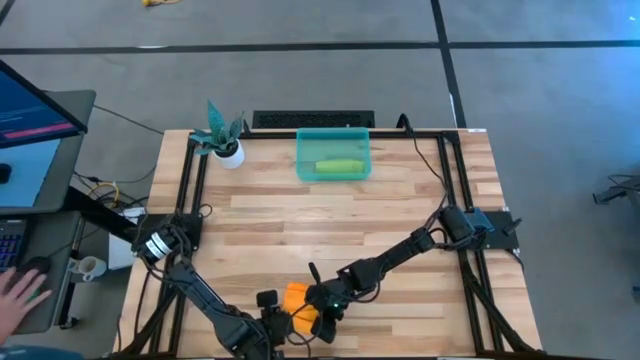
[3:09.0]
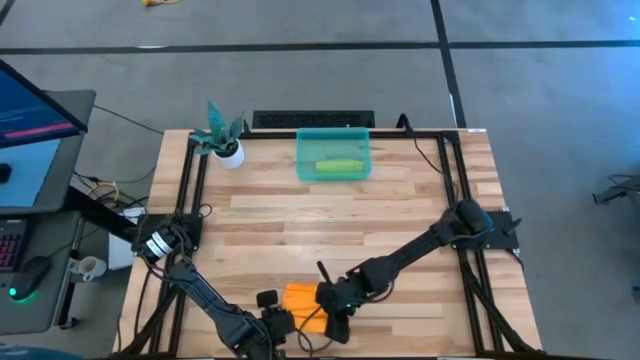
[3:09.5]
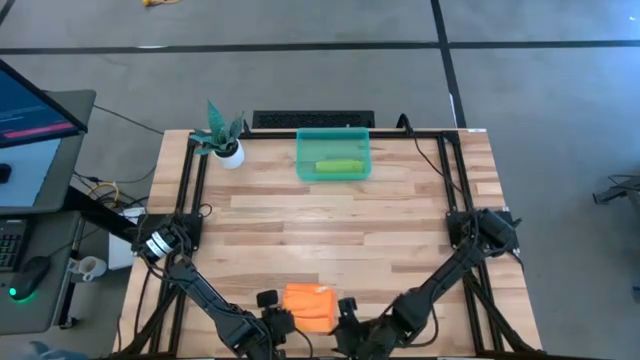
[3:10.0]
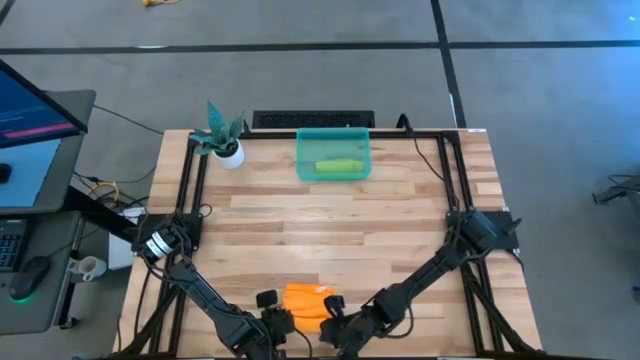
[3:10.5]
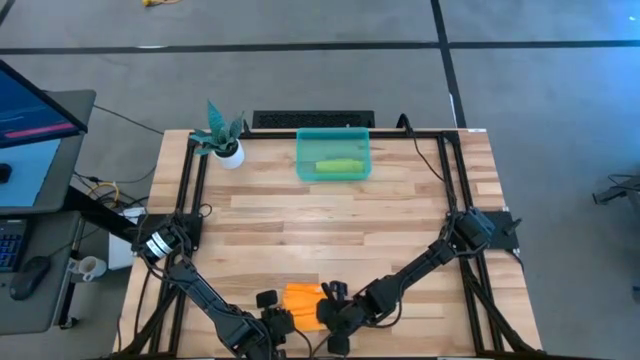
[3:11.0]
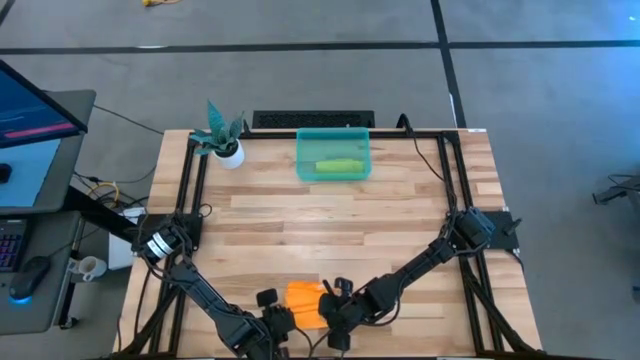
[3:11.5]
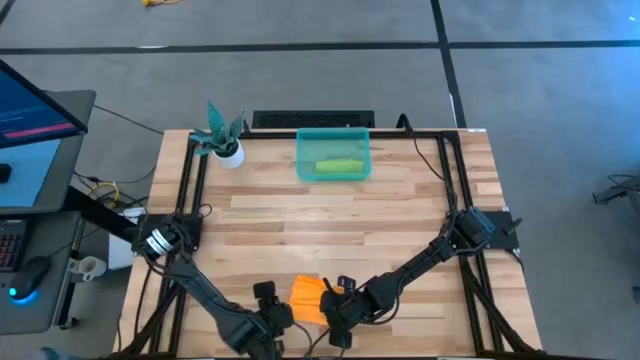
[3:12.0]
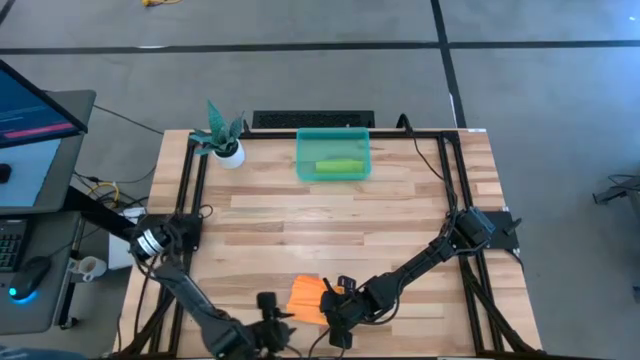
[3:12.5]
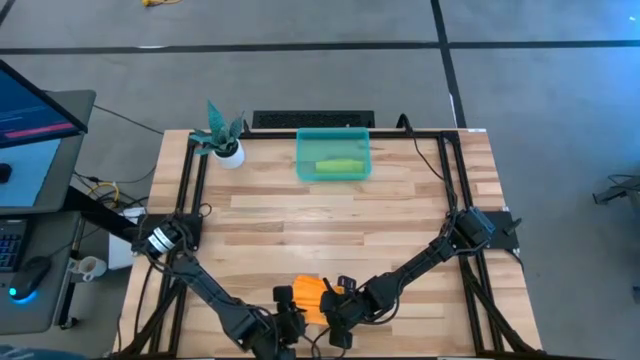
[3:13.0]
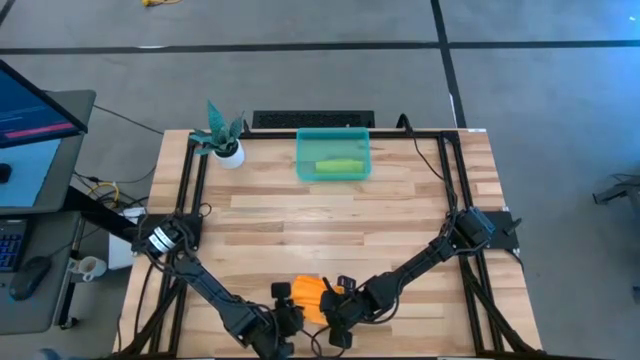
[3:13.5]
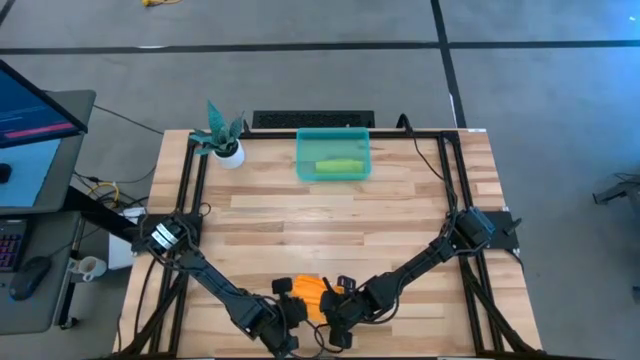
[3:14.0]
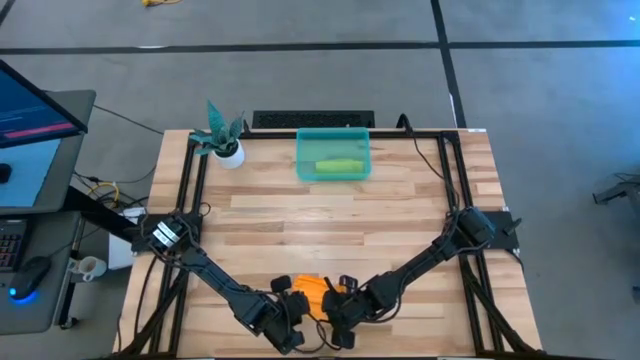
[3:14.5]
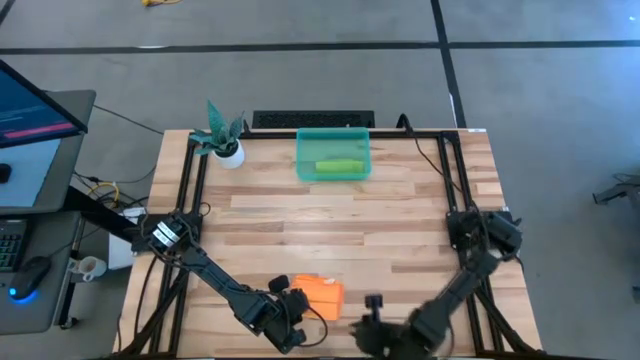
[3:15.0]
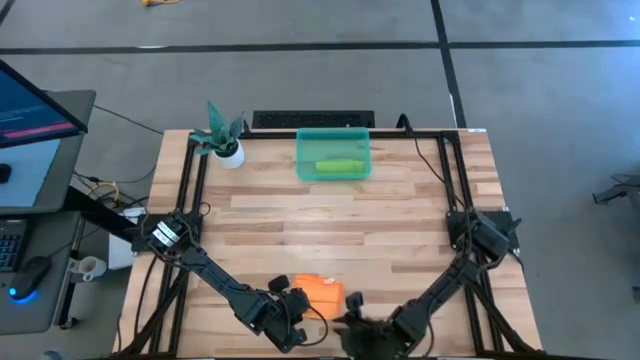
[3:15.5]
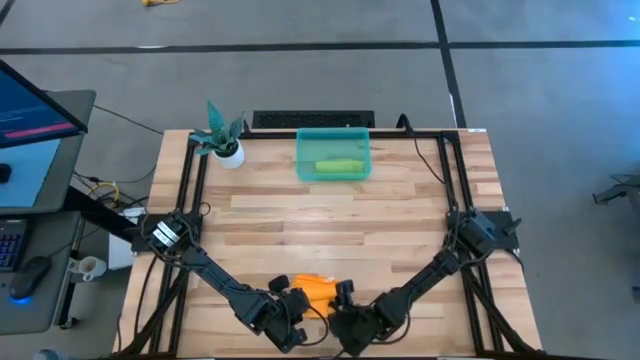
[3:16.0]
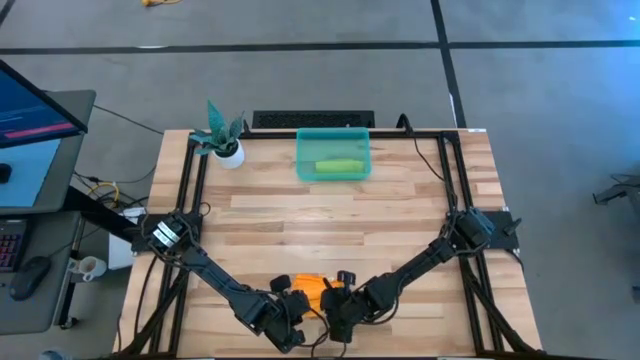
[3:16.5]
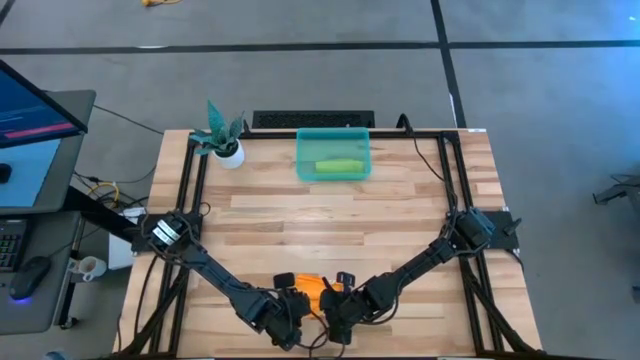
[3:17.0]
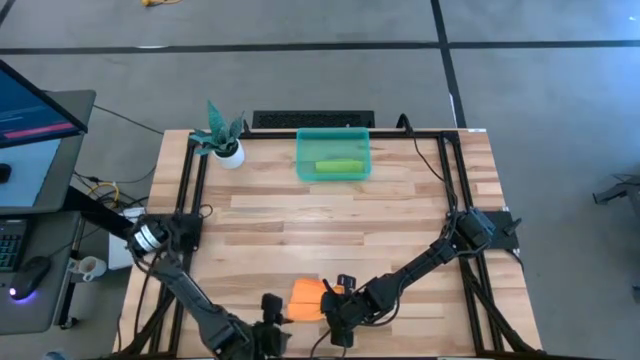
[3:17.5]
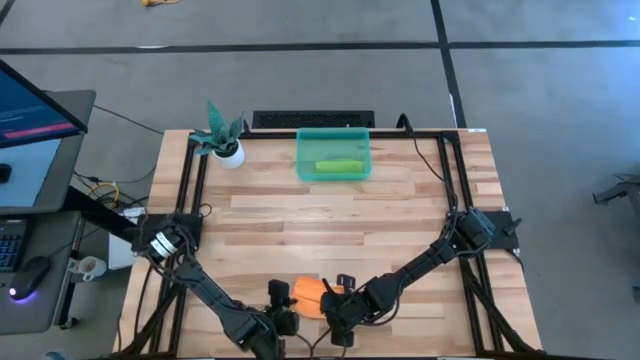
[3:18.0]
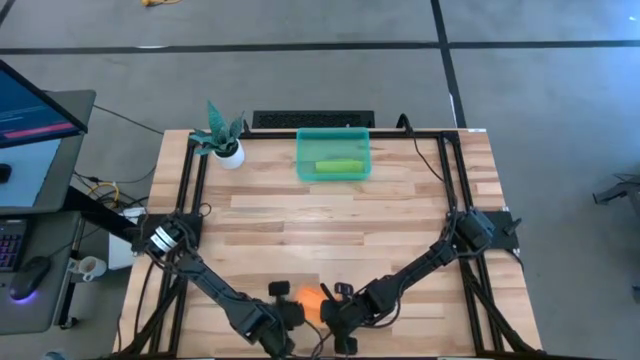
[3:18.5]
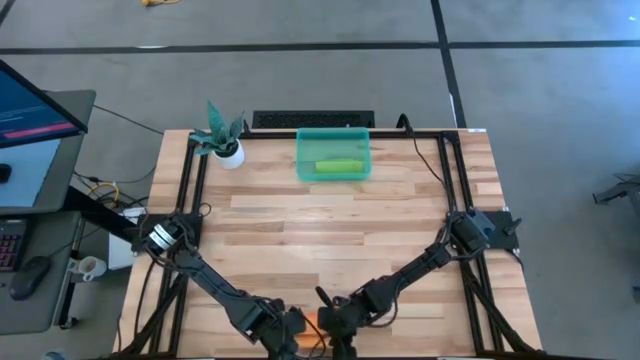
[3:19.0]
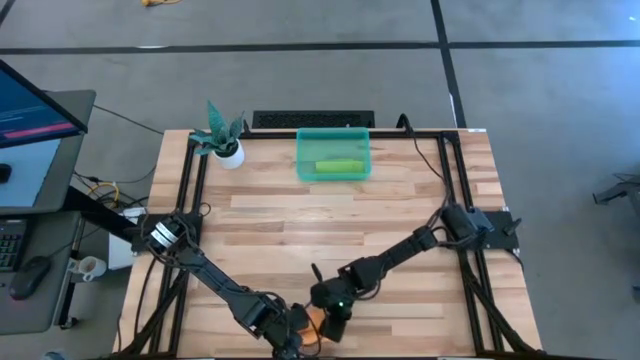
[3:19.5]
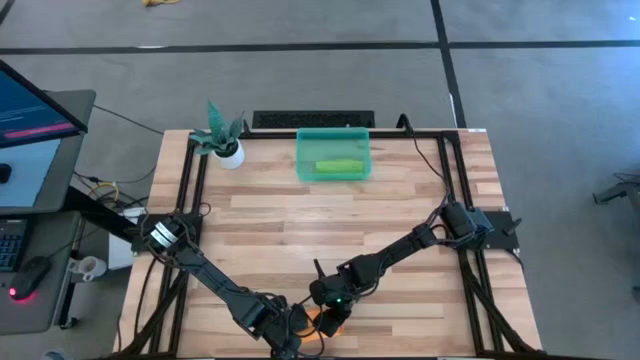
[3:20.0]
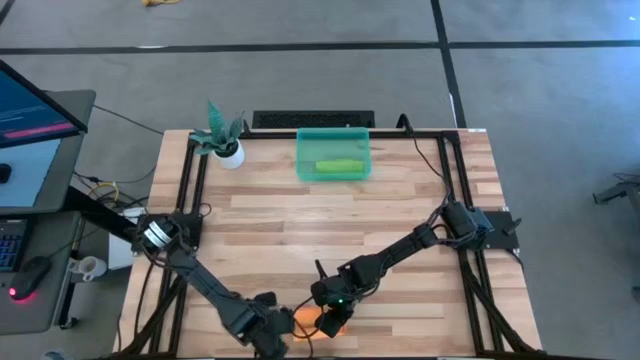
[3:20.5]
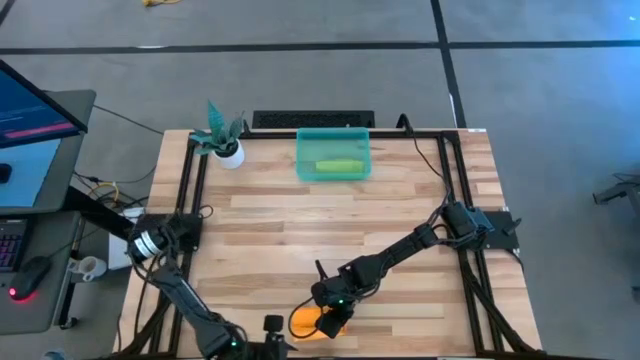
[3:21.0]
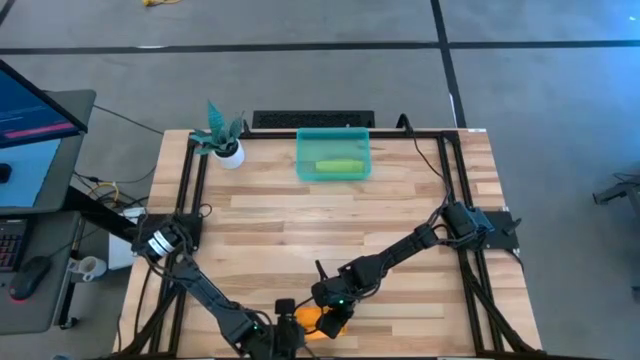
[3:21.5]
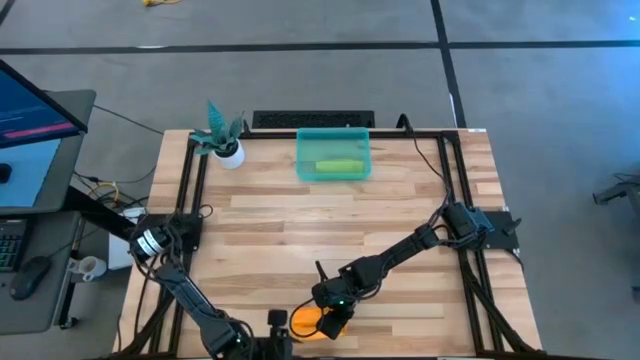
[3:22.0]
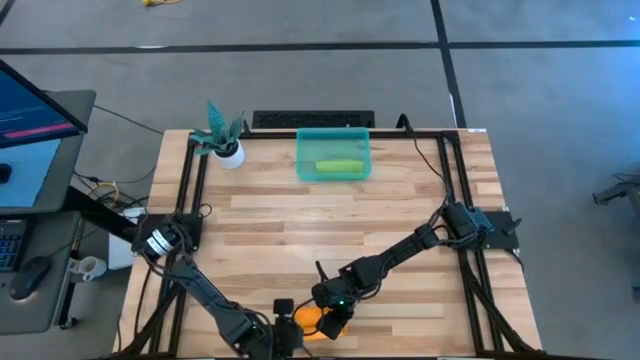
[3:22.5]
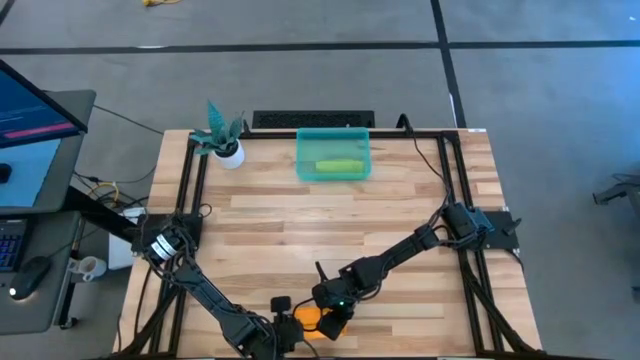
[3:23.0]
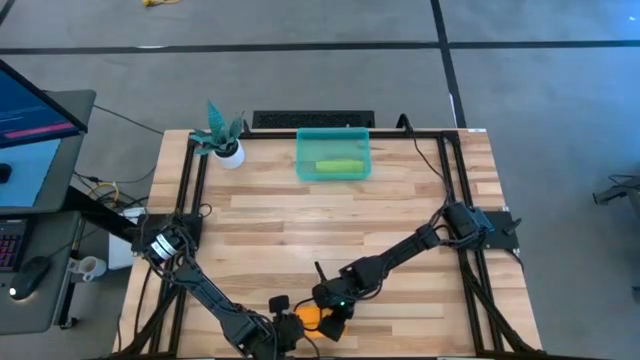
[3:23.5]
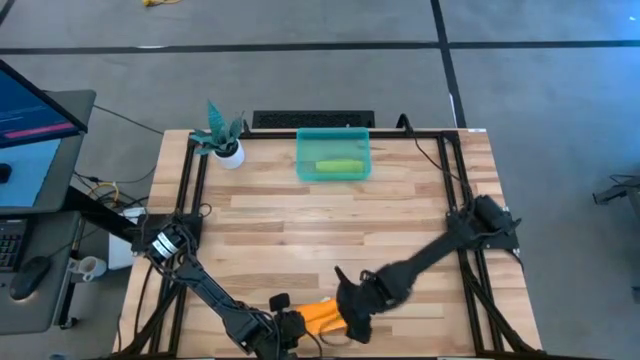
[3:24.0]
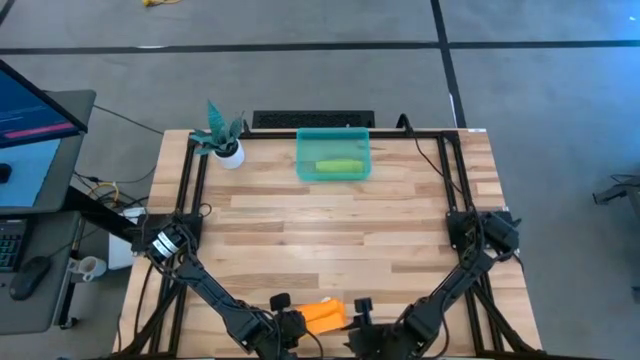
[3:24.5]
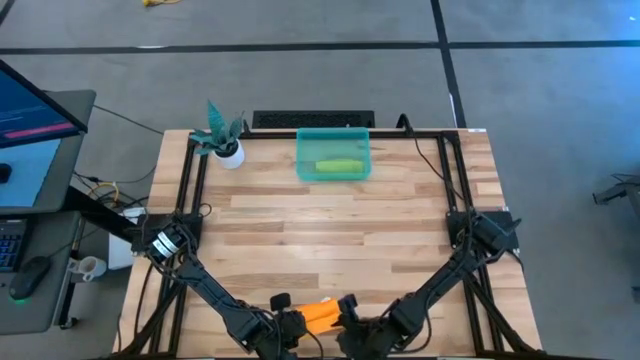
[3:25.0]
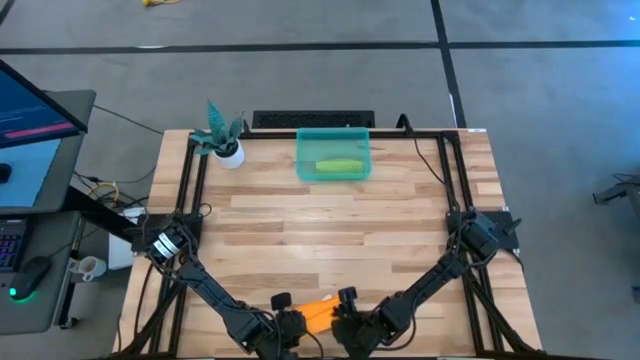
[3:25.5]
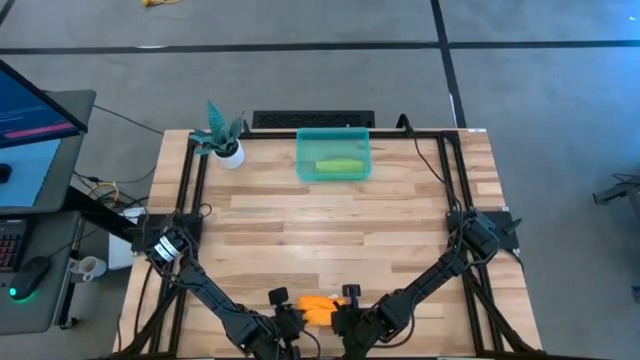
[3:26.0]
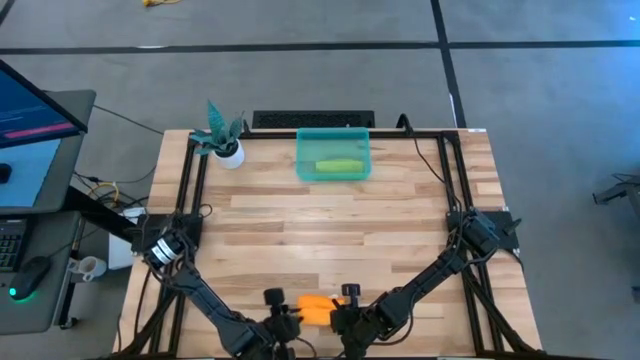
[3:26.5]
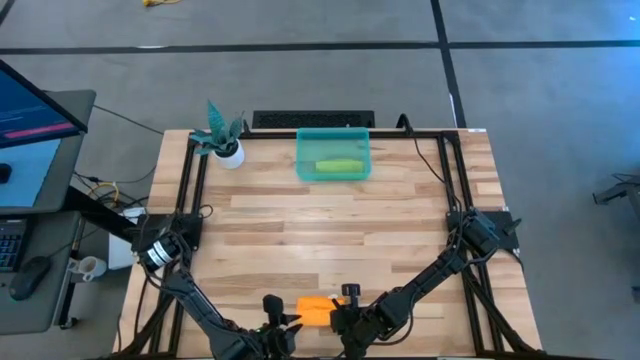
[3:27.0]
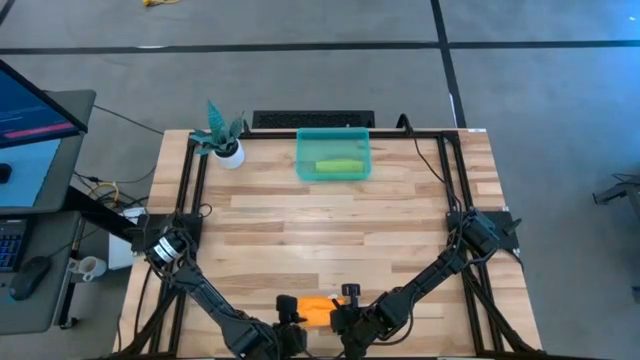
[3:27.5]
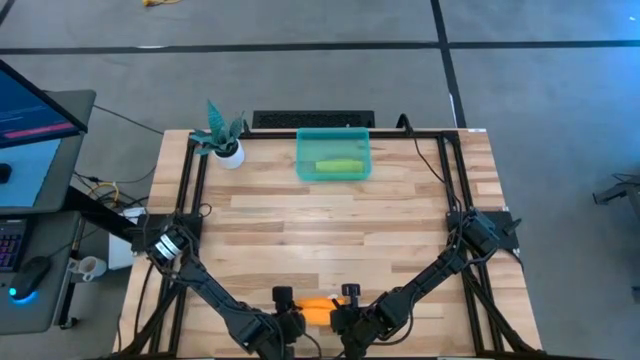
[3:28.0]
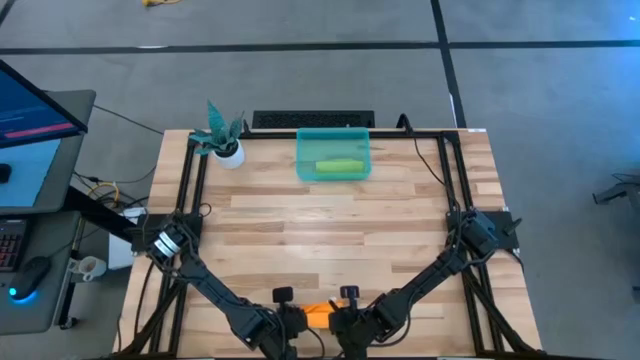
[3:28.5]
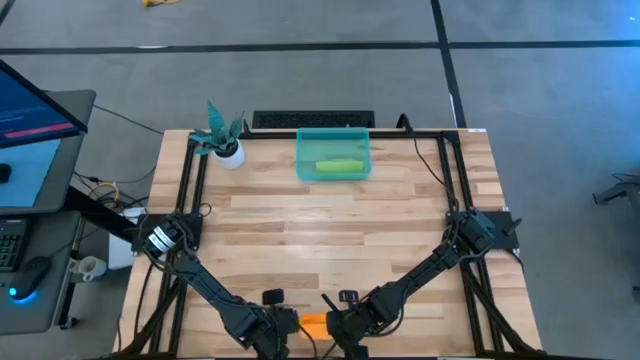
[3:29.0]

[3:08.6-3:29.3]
Task: Roll towel into tight, uniform cylinder
Roll the orange microfiber towel
